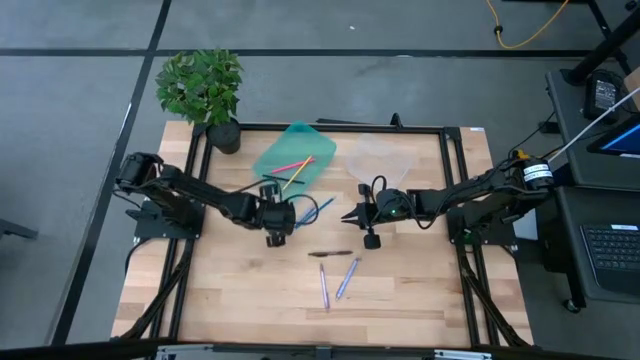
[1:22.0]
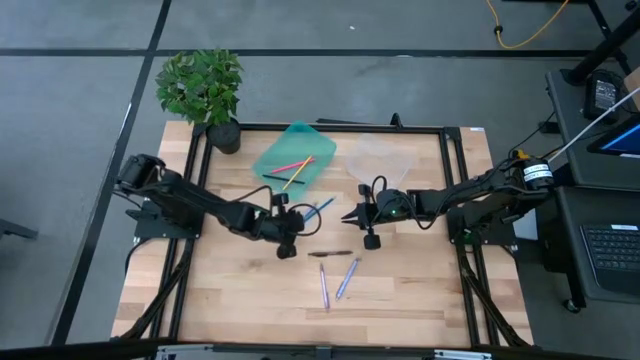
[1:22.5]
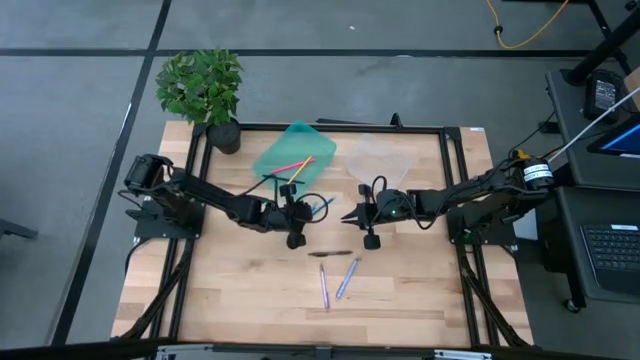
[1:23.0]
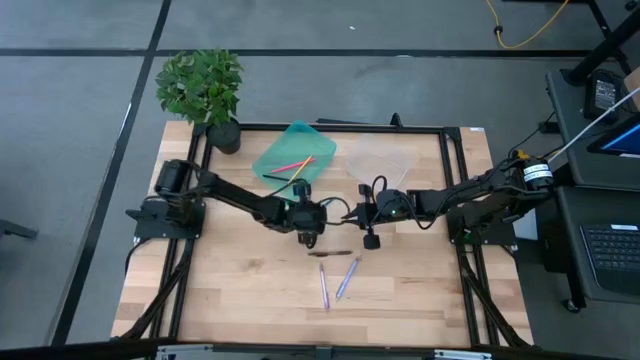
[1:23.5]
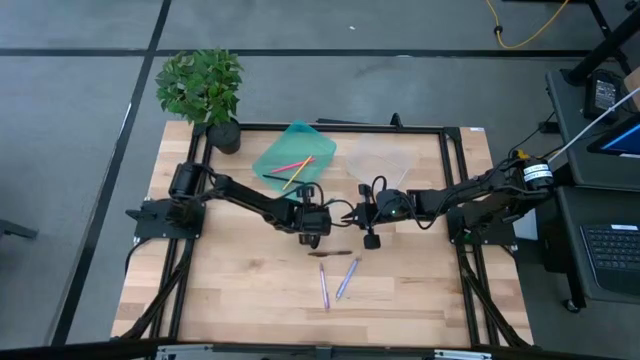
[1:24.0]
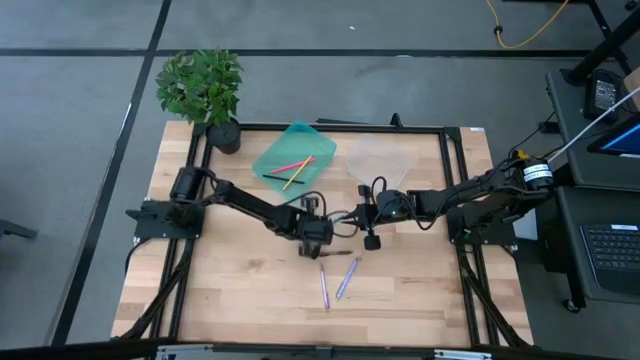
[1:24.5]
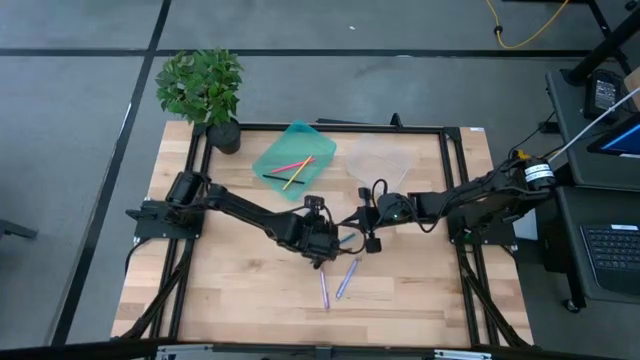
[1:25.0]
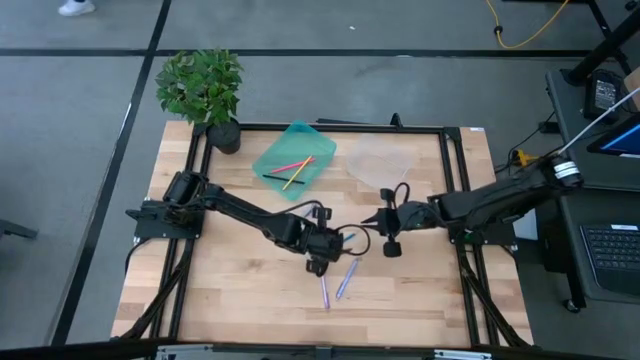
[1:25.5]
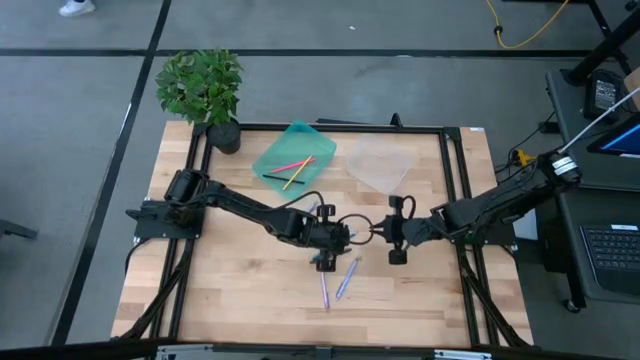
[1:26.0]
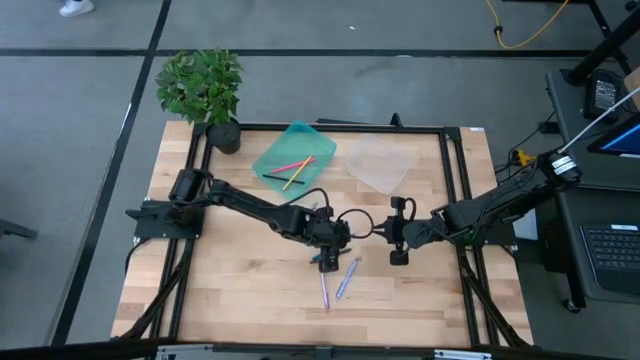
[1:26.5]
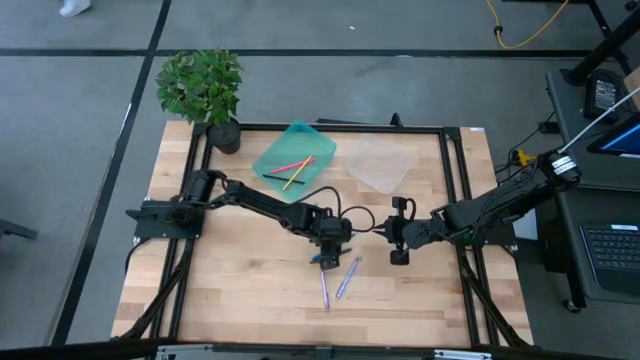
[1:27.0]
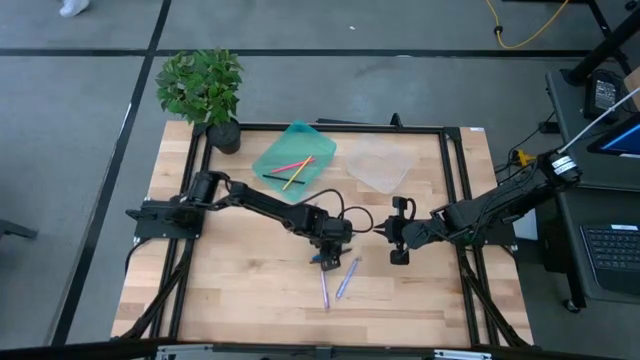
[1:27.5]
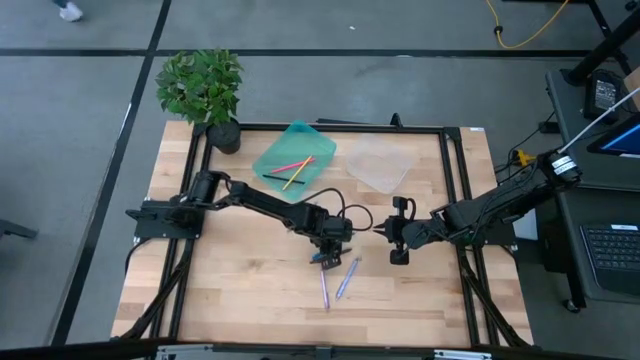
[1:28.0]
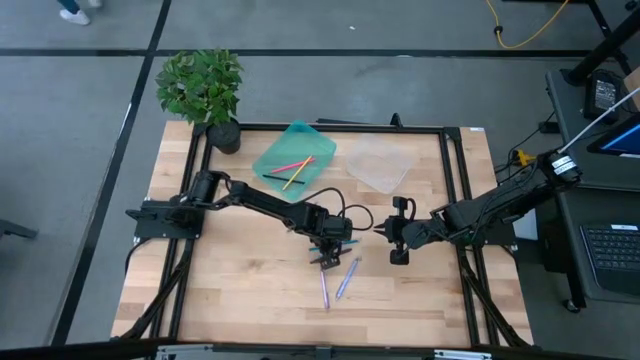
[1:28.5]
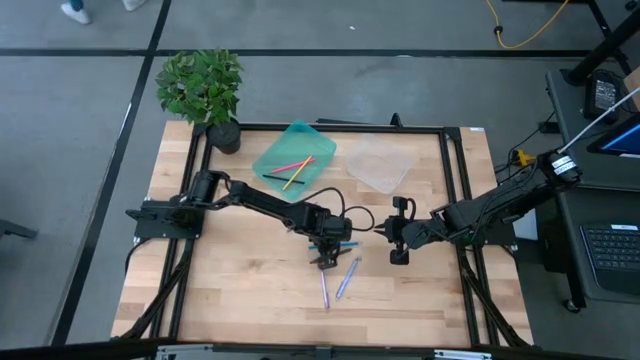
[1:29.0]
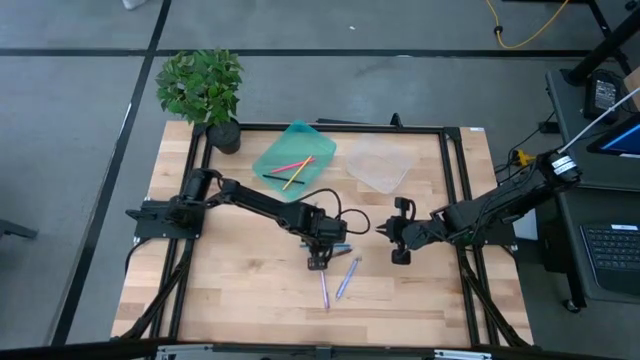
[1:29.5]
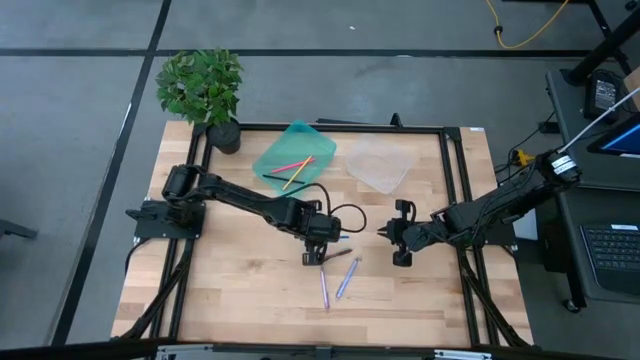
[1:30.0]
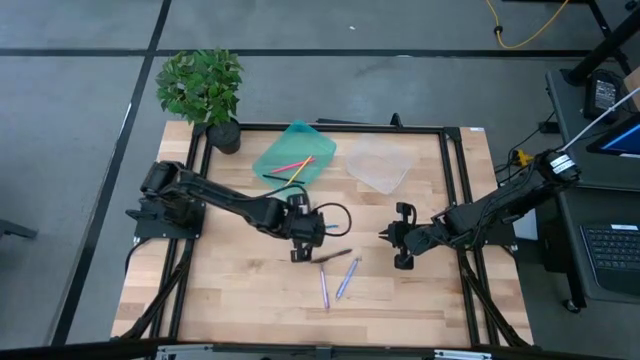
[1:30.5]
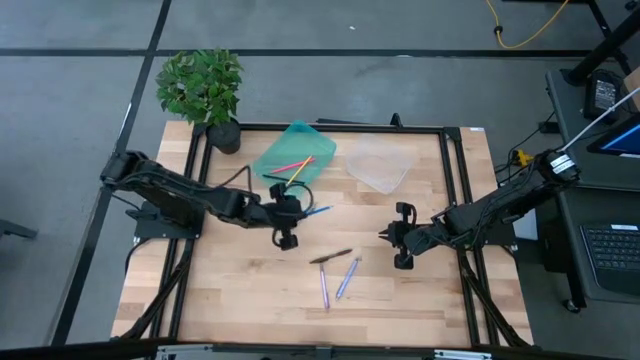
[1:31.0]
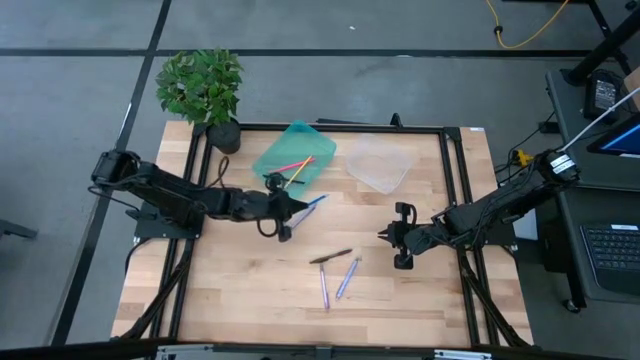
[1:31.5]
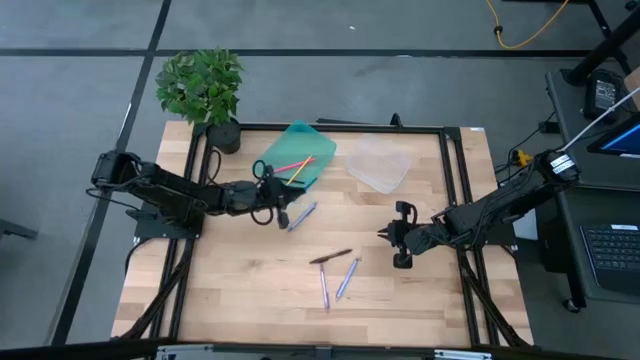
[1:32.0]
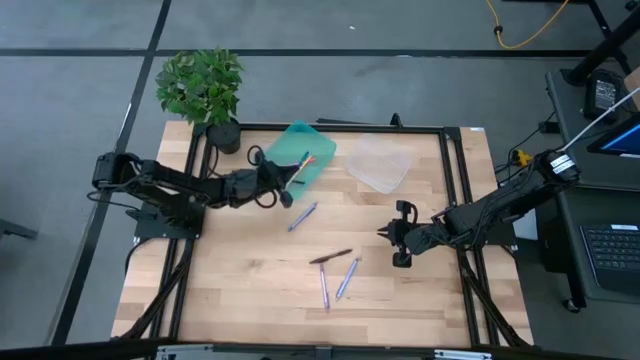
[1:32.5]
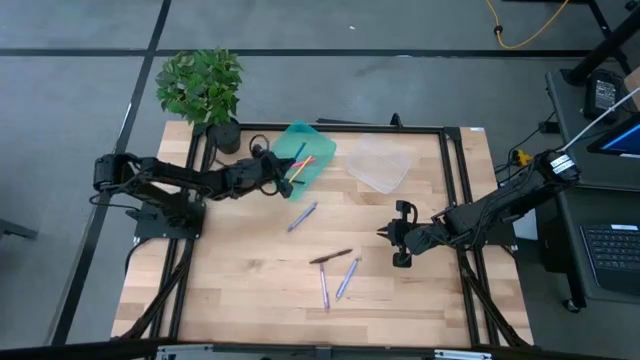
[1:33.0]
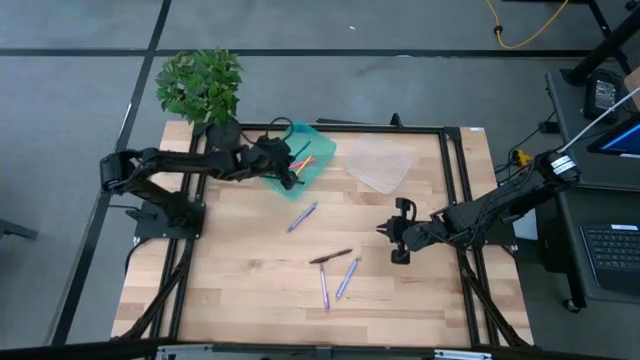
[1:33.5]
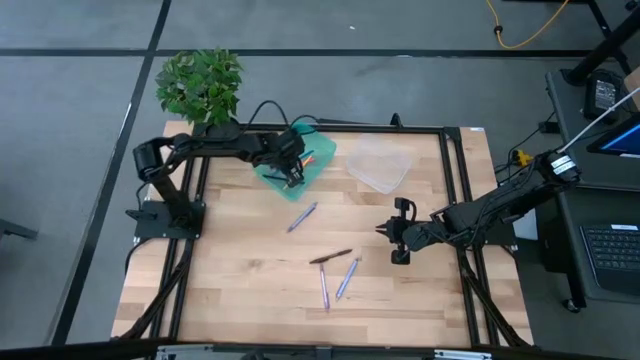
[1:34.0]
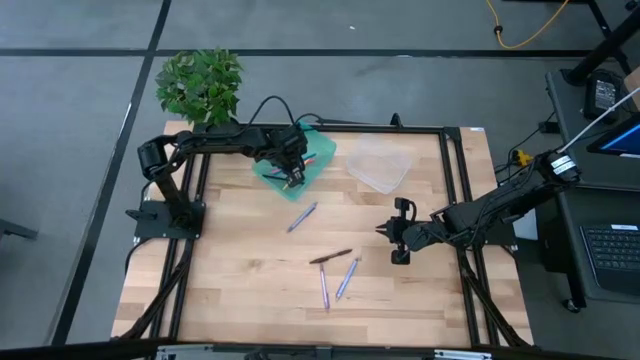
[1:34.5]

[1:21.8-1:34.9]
Task: Sort pens & pencils
Put the blue pencil into the blue bin

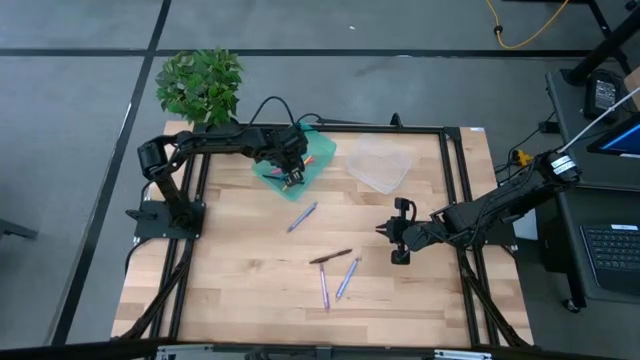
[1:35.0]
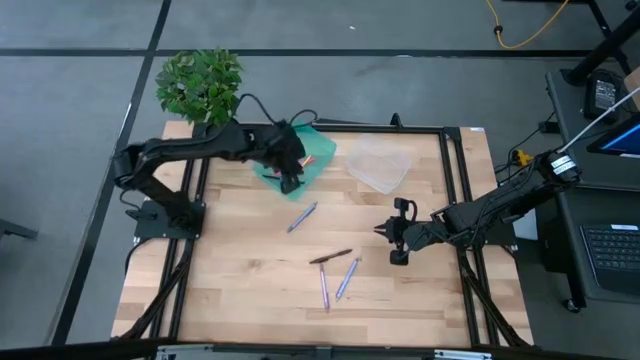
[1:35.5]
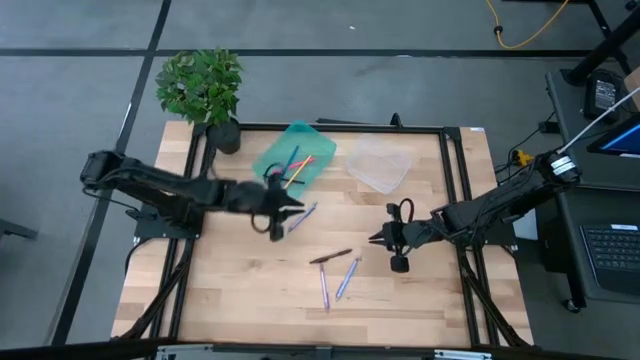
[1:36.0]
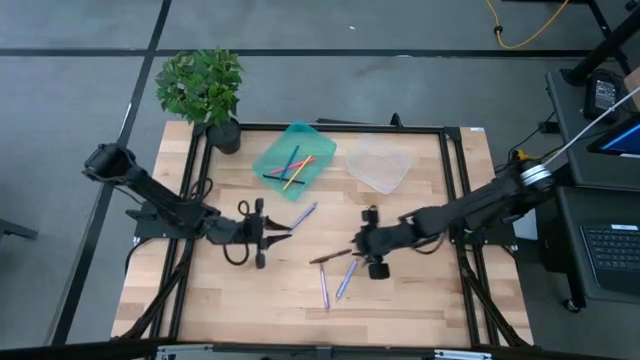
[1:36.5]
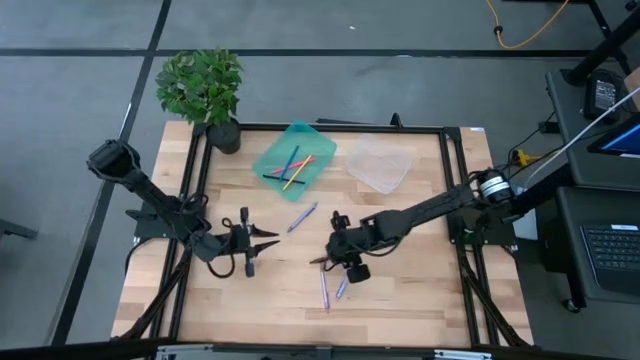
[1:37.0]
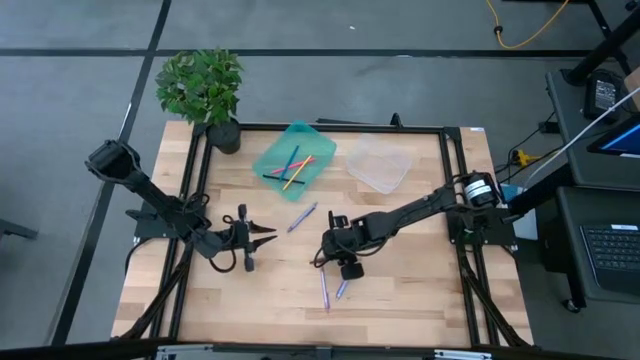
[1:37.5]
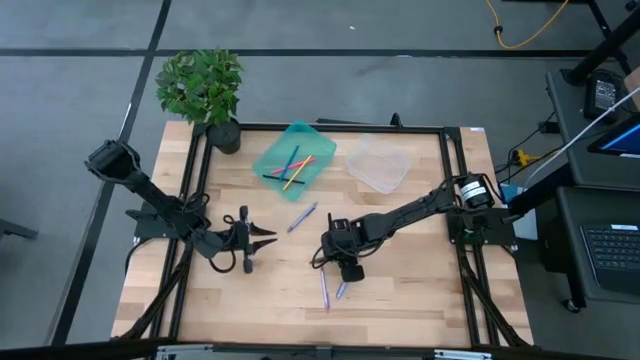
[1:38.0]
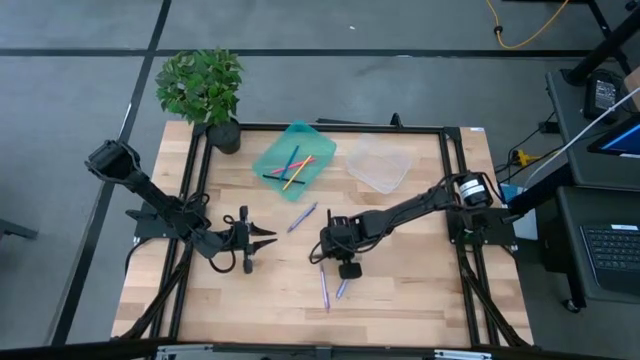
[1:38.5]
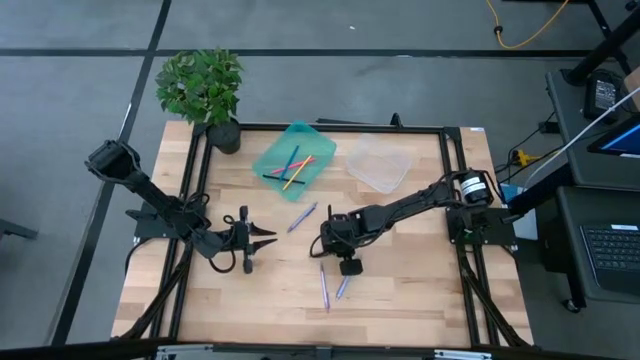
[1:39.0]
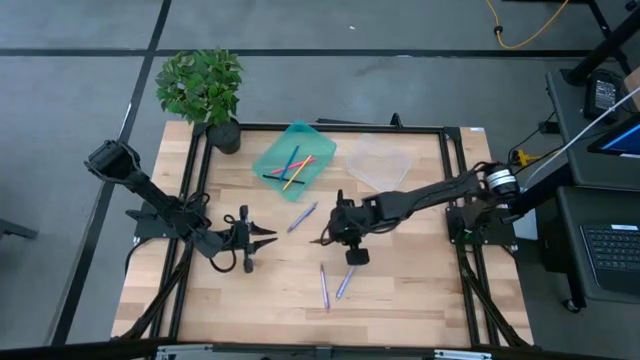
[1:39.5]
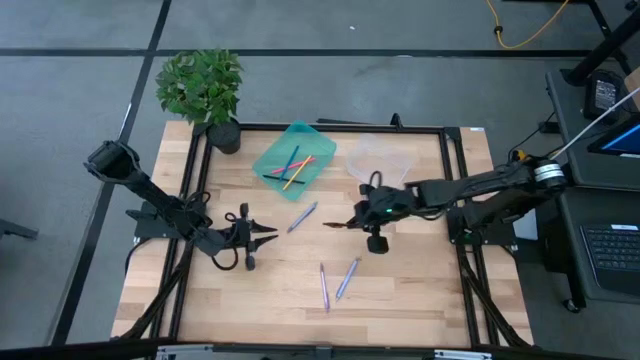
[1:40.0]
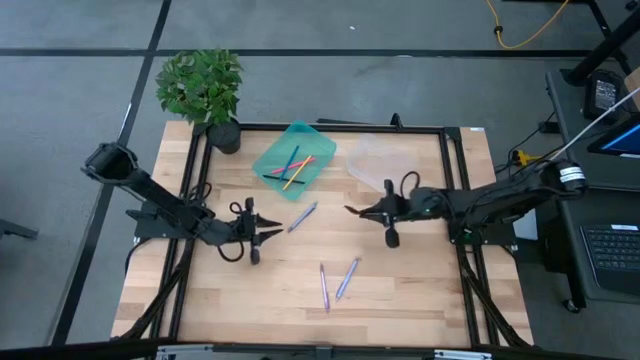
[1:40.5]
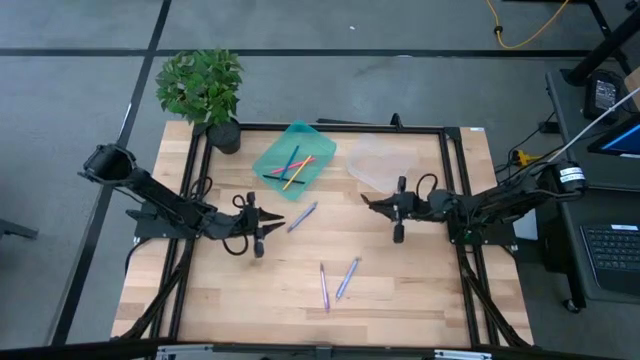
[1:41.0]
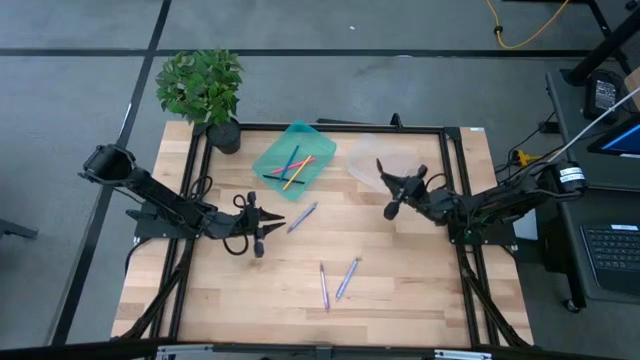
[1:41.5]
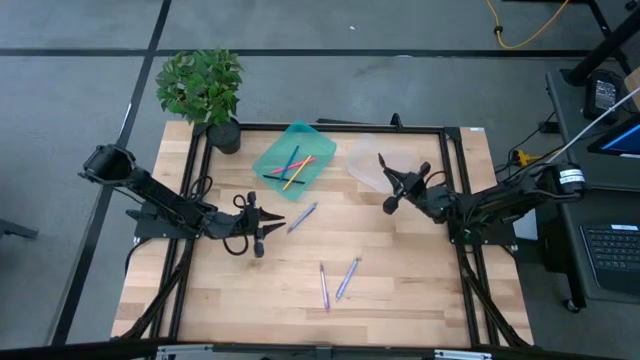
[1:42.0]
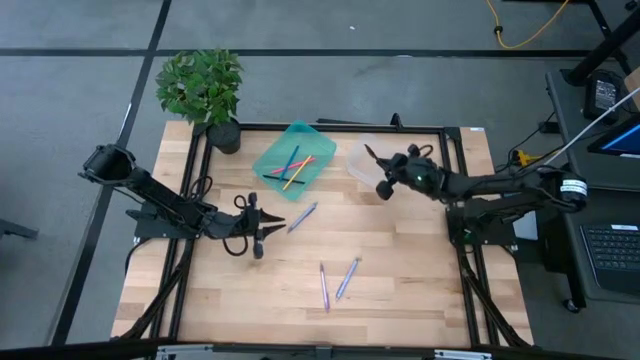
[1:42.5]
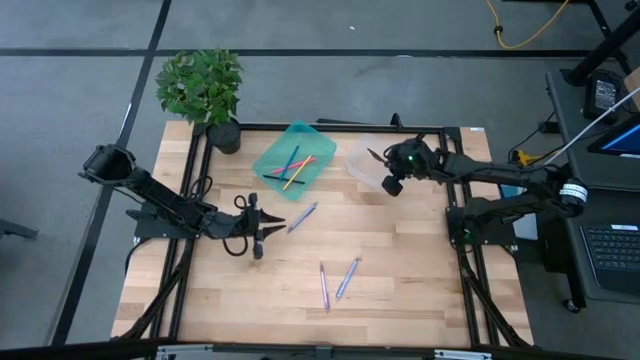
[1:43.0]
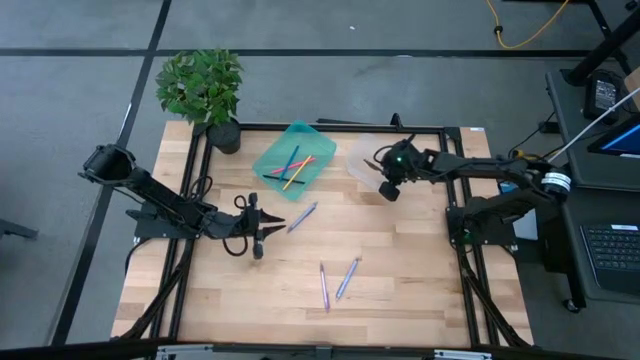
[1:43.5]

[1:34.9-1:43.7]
Put the brown pen into the transparent bin
